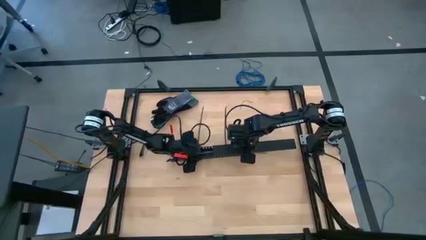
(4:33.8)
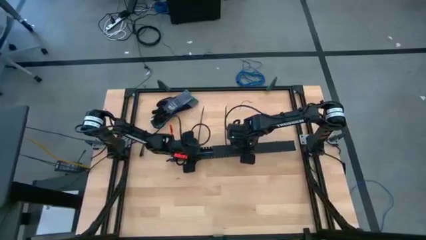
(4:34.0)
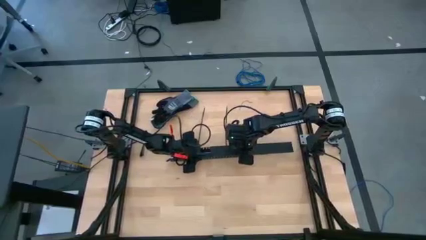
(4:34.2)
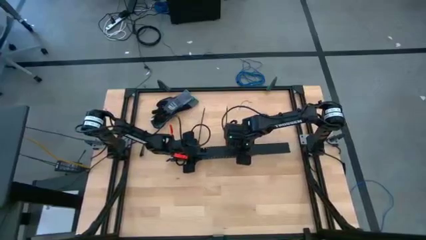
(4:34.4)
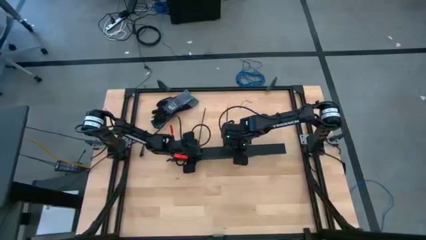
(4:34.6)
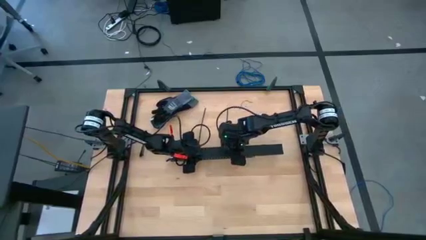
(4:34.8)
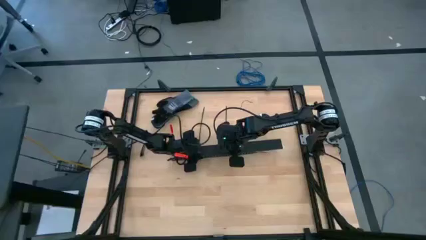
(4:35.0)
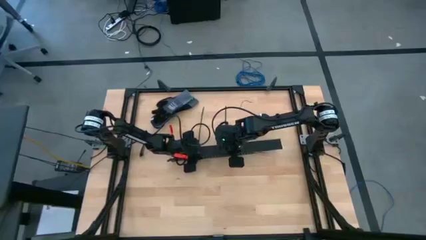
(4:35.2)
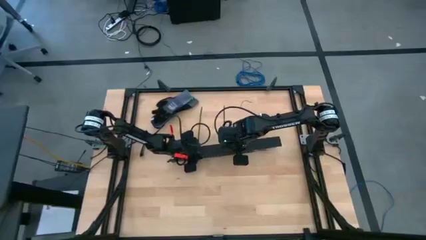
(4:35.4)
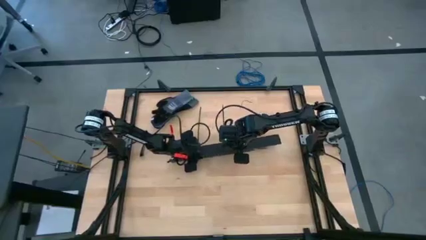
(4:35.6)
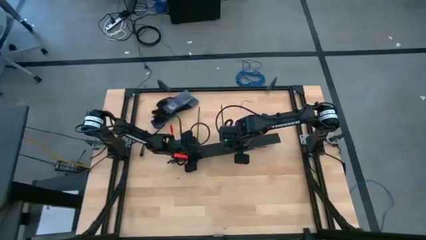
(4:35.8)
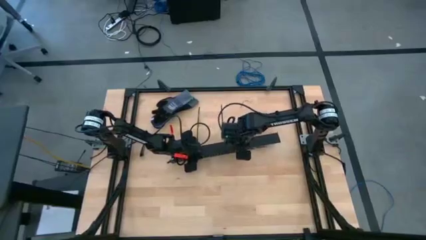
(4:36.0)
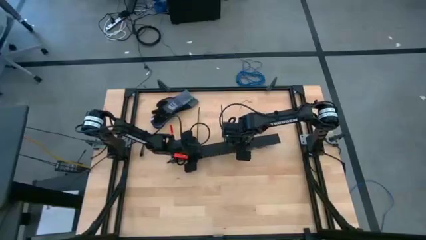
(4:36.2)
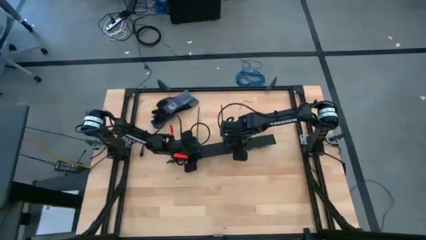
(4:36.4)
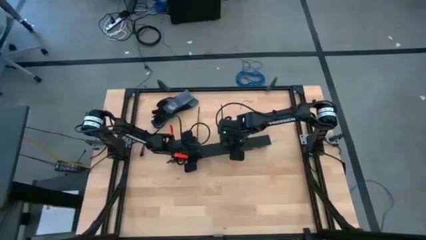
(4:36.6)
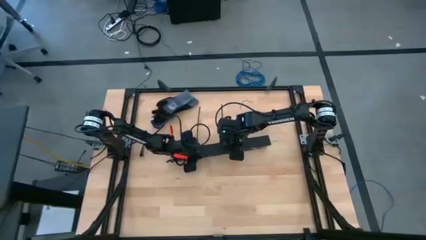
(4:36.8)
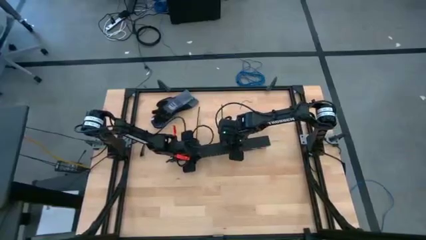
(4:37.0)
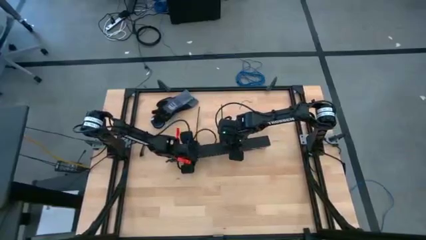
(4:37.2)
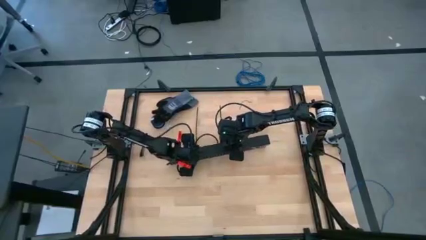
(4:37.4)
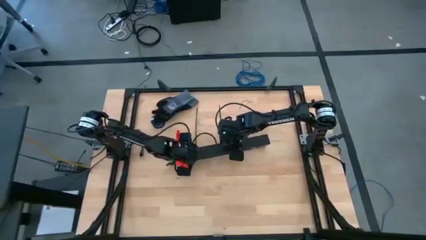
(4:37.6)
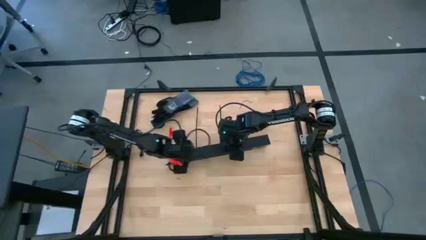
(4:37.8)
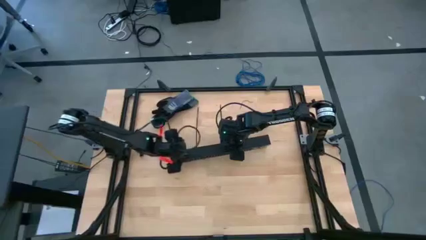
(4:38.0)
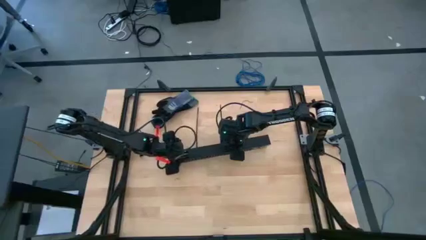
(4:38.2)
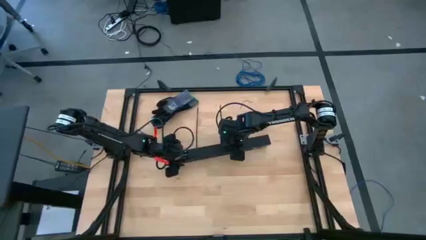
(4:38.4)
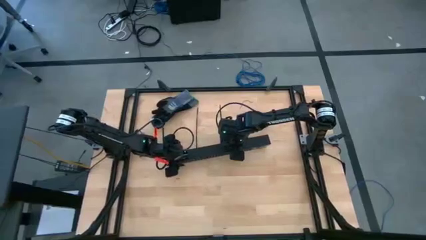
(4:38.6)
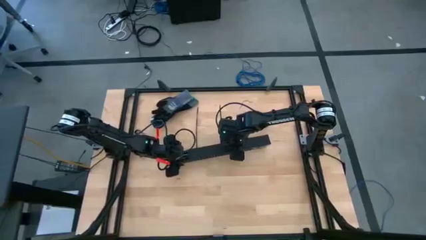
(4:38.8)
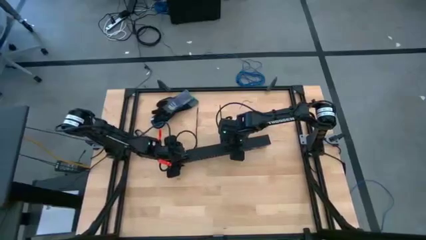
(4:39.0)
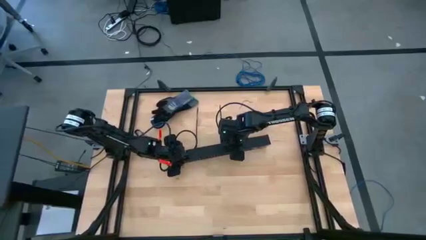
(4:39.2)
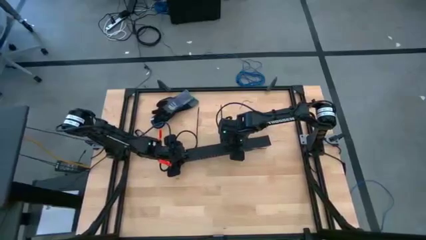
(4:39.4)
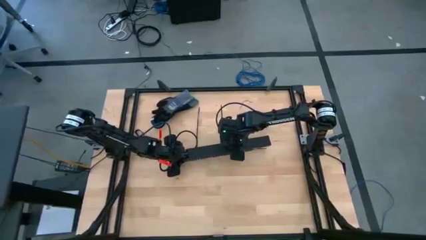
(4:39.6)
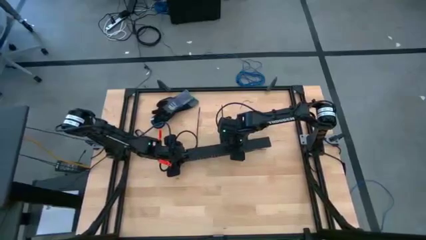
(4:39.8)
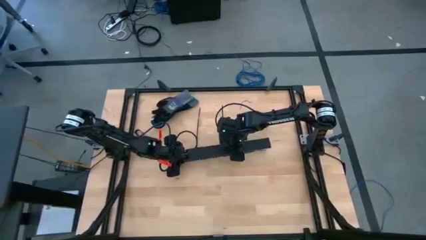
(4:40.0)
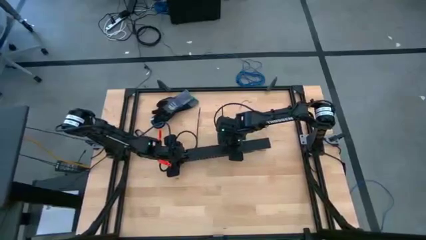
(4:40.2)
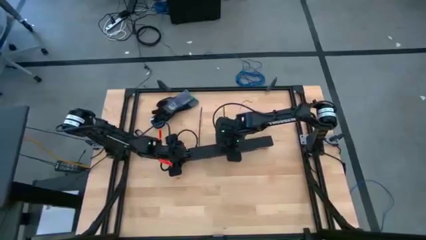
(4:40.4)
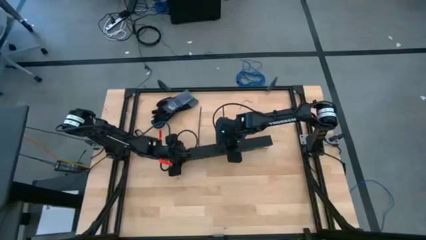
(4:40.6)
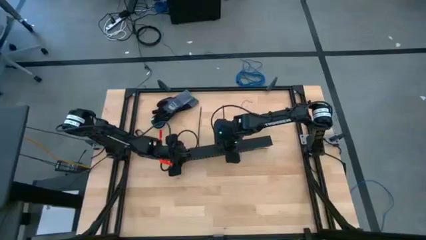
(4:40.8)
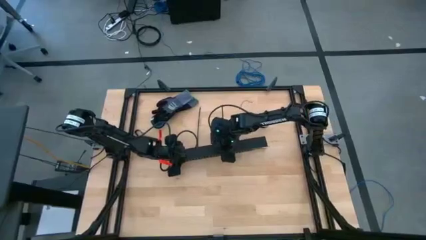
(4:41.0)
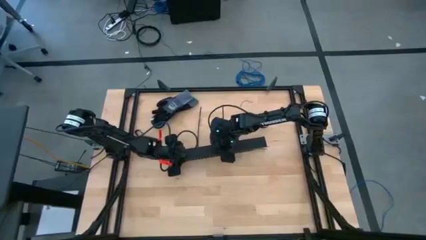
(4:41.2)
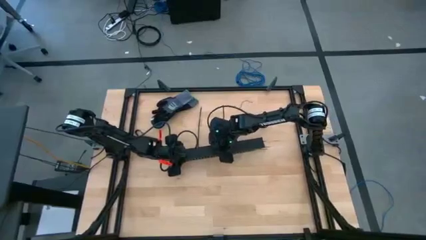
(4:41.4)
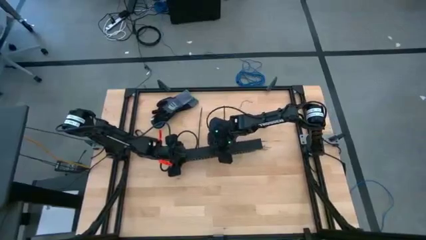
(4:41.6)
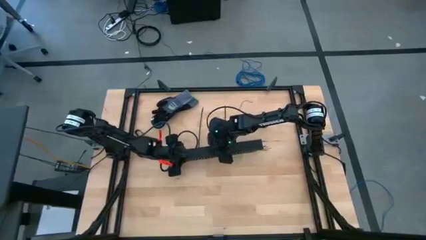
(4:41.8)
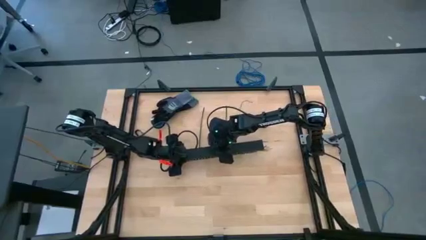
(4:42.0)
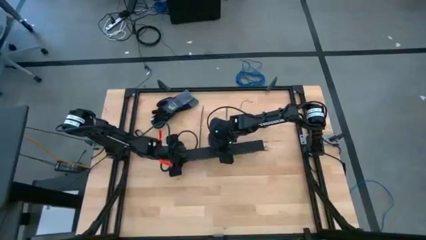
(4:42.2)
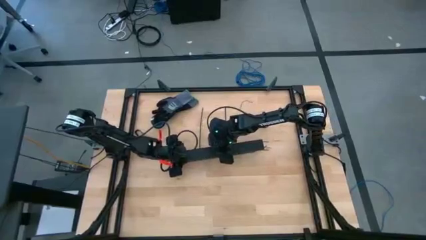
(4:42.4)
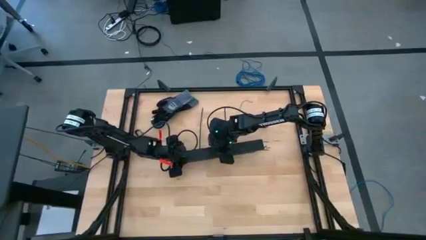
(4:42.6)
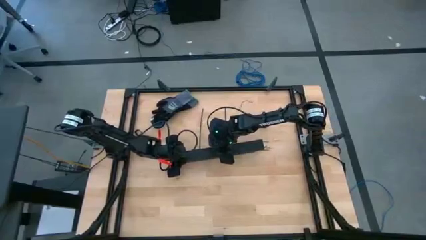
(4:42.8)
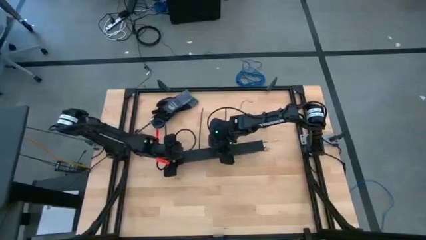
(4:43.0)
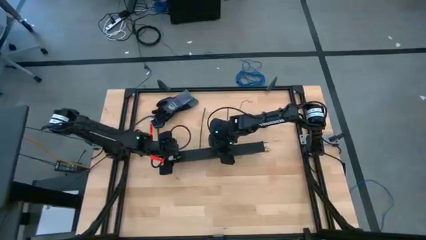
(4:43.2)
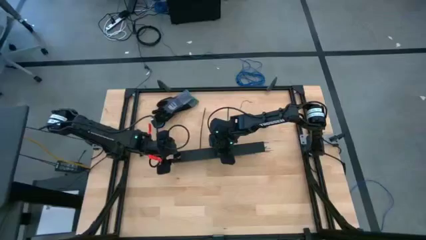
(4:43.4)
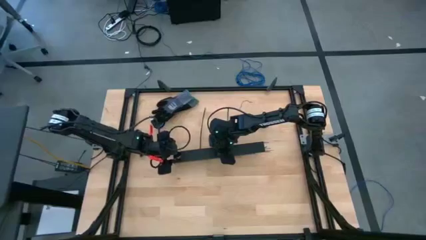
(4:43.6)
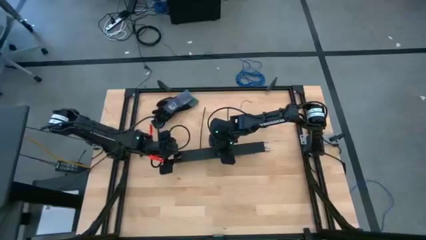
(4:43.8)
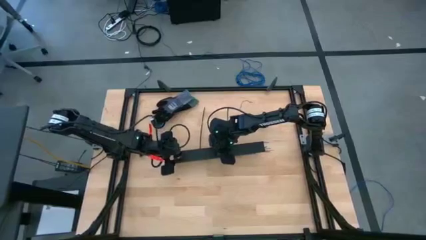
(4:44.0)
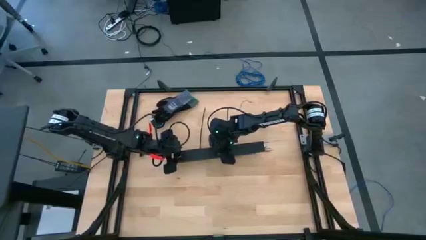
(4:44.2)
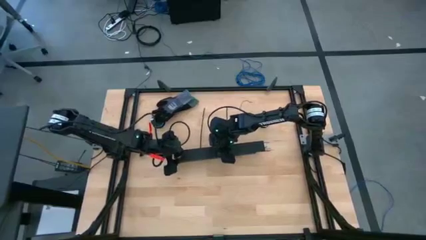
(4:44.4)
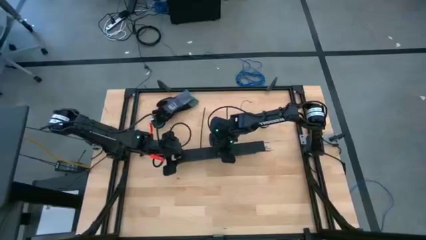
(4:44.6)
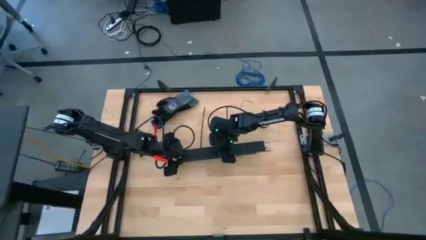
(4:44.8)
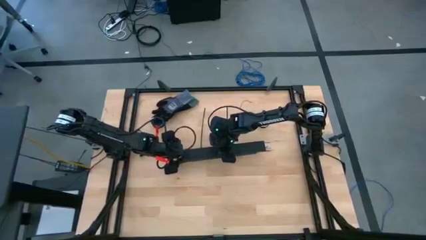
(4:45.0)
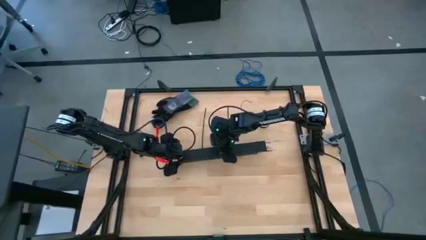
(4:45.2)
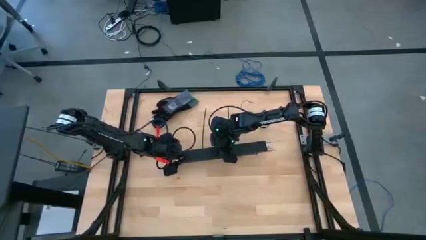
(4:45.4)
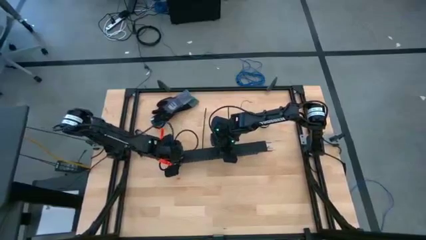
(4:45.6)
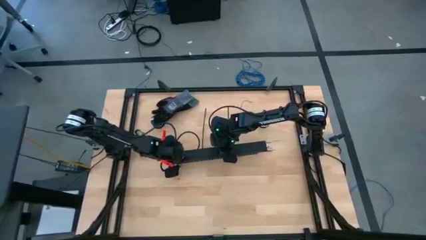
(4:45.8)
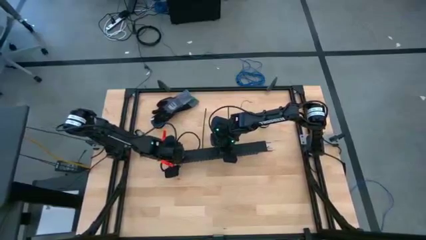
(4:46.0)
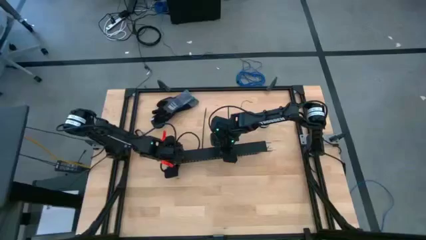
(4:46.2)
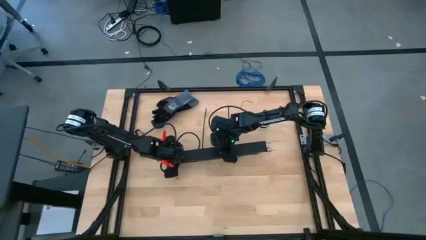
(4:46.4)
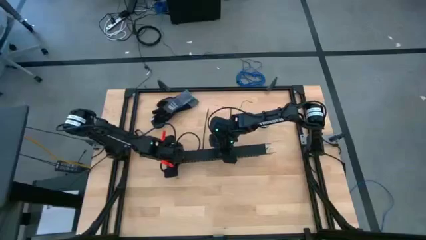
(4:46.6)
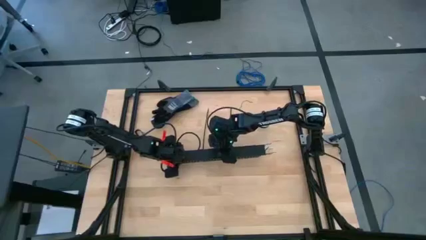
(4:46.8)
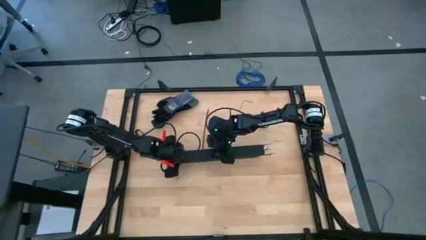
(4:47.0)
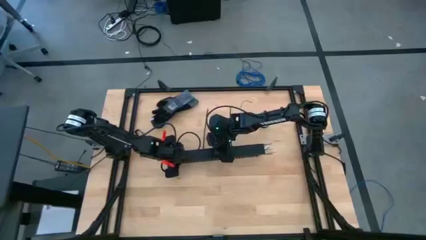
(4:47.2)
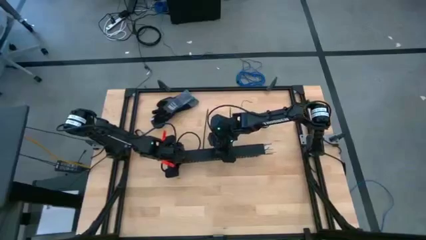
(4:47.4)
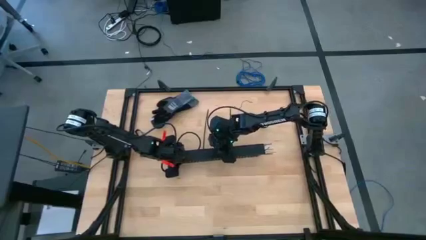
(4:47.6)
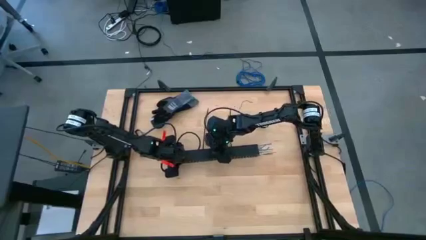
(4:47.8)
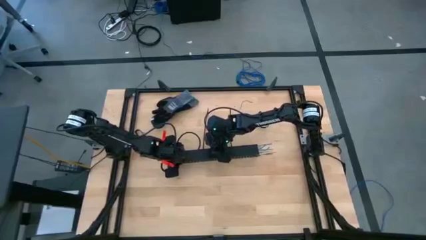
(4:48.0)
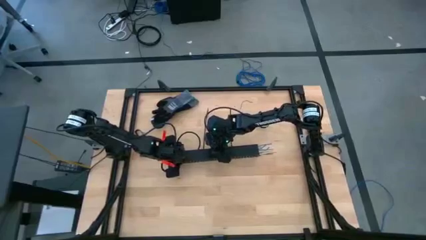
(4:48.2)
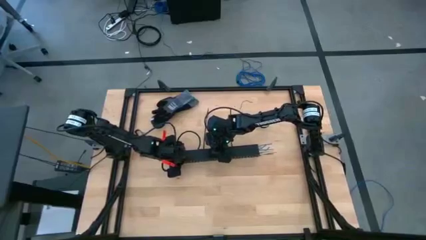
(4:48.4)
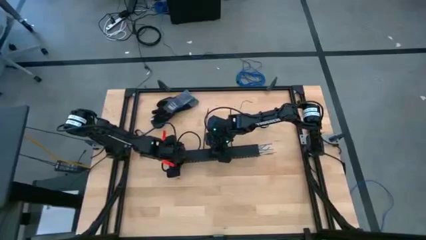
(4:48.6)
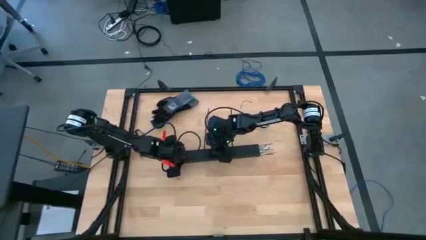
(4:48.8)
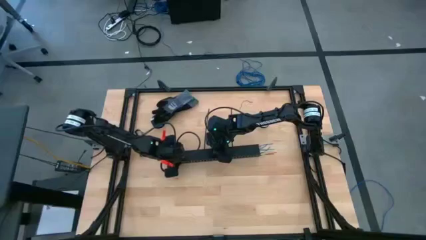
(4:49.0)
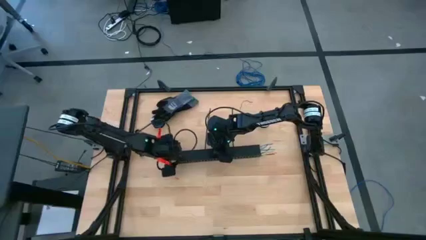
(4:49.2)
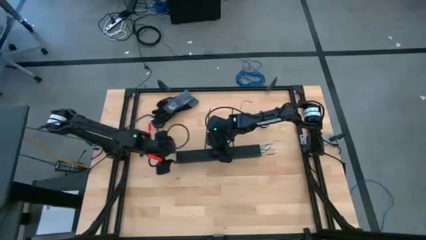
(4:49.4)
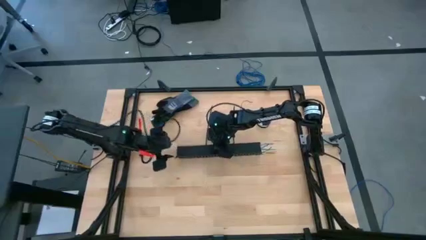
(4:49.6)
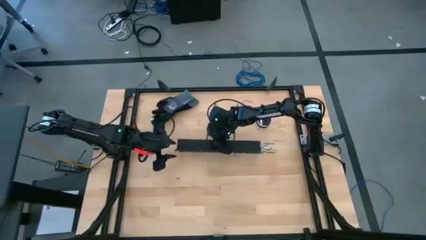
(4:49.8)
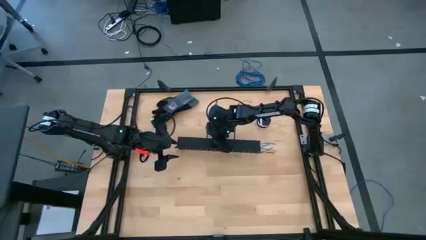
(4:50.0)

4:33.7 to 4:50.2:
Task: Ziptie cables
Close the black cable duct
